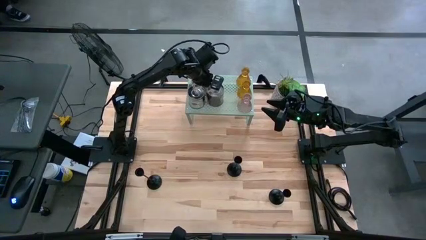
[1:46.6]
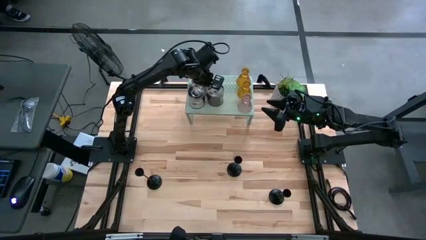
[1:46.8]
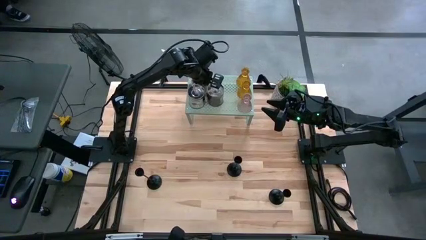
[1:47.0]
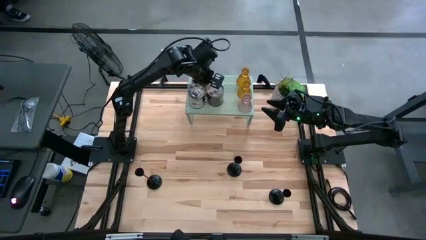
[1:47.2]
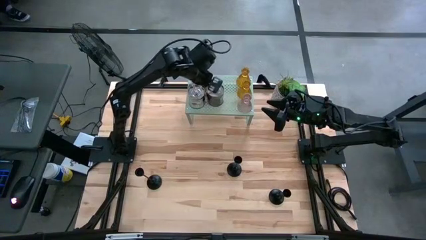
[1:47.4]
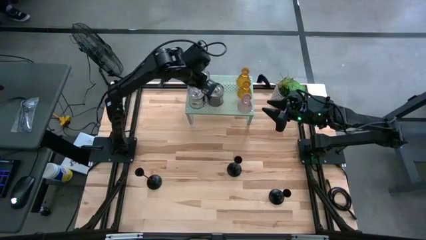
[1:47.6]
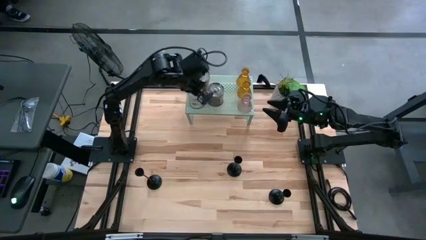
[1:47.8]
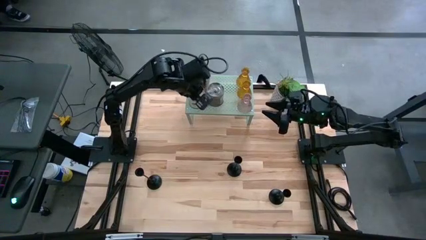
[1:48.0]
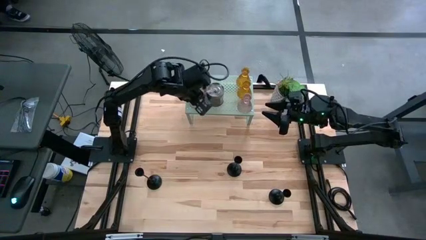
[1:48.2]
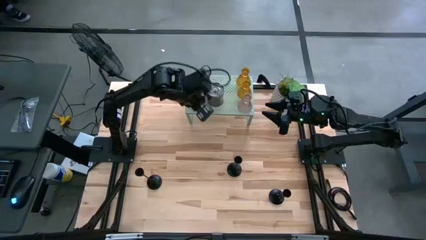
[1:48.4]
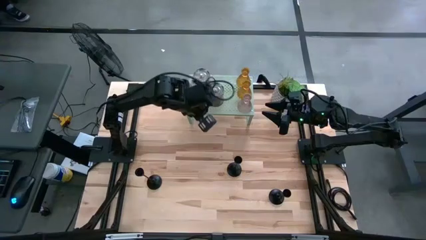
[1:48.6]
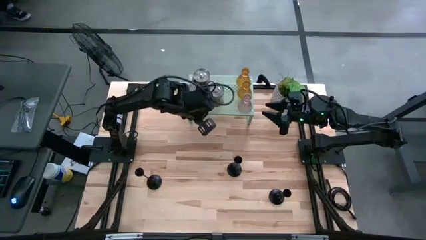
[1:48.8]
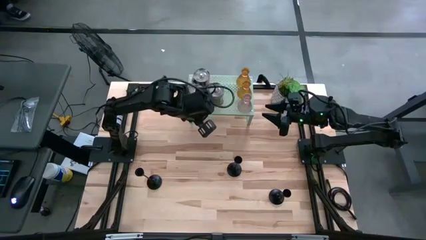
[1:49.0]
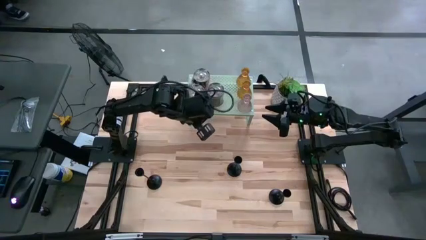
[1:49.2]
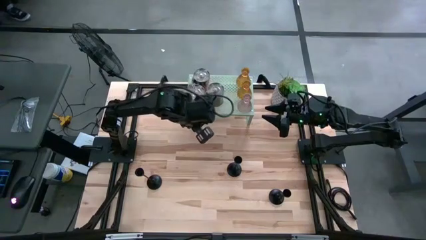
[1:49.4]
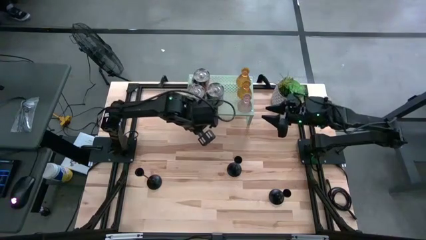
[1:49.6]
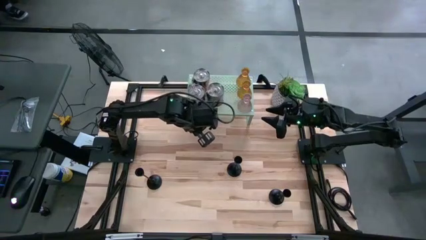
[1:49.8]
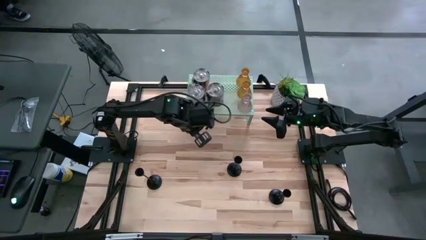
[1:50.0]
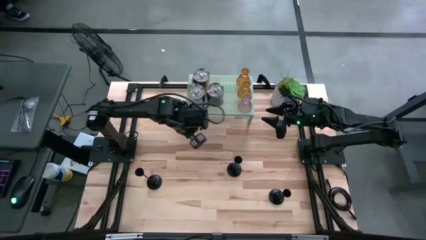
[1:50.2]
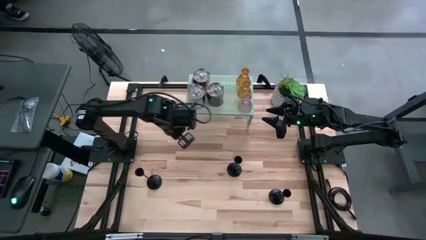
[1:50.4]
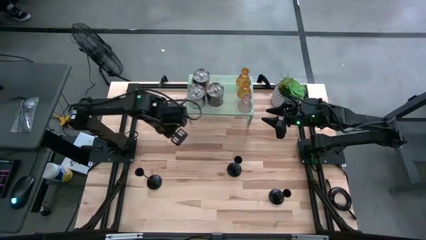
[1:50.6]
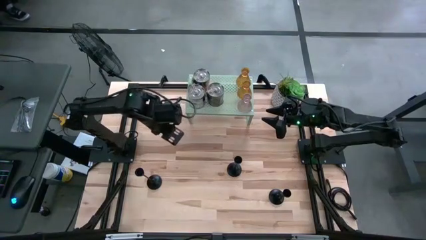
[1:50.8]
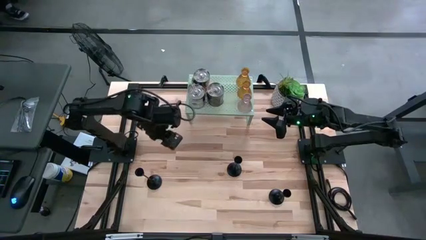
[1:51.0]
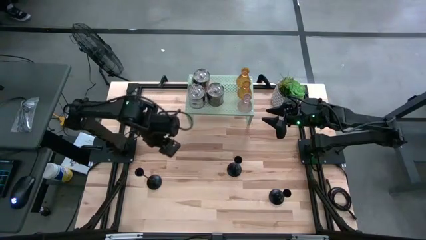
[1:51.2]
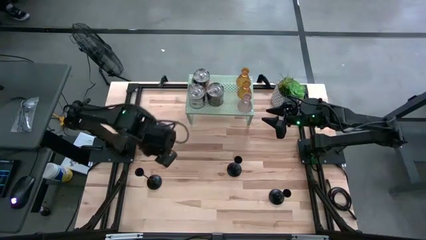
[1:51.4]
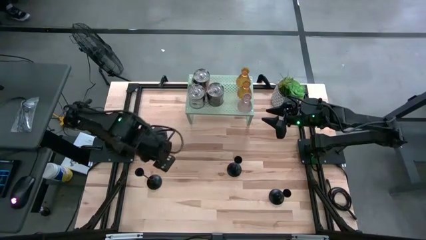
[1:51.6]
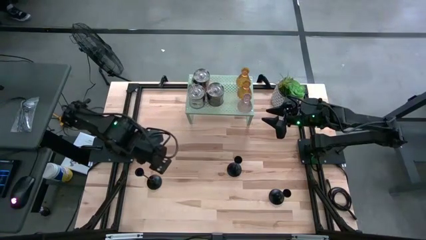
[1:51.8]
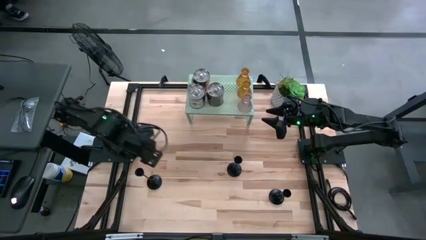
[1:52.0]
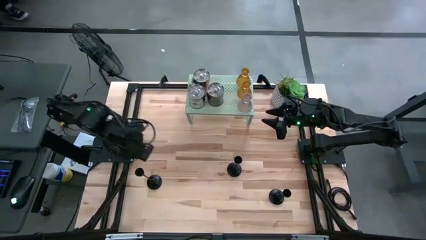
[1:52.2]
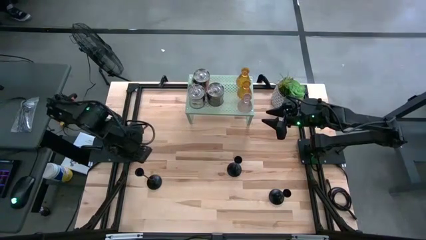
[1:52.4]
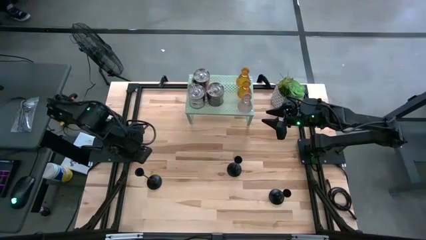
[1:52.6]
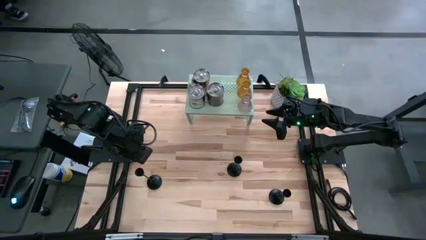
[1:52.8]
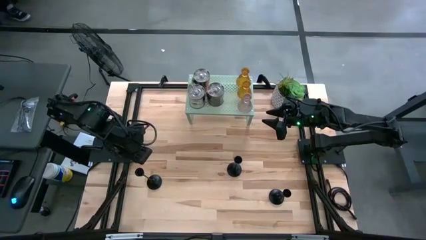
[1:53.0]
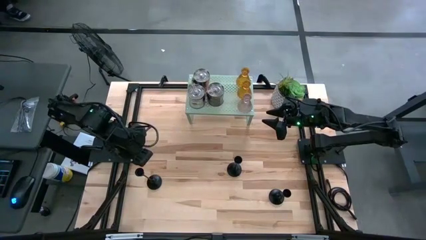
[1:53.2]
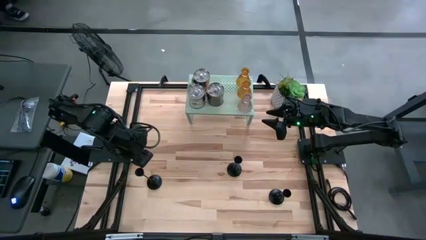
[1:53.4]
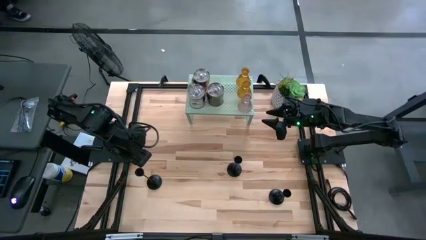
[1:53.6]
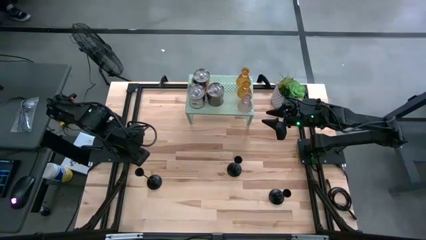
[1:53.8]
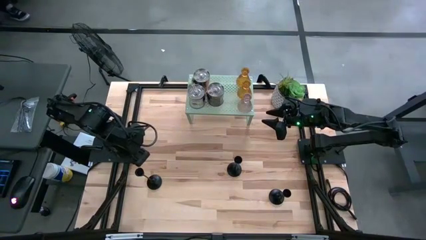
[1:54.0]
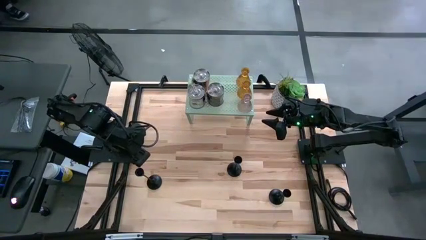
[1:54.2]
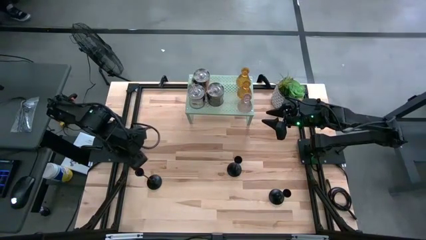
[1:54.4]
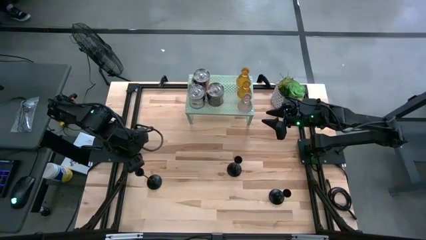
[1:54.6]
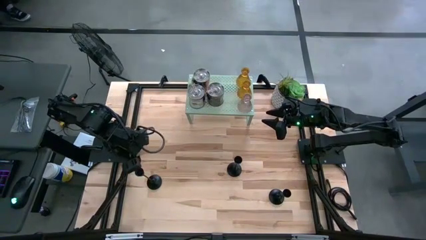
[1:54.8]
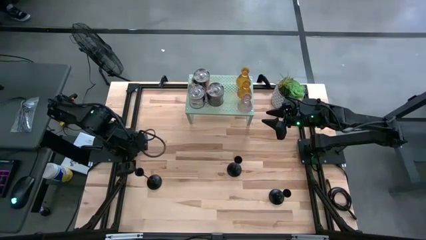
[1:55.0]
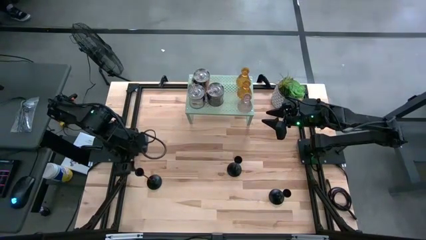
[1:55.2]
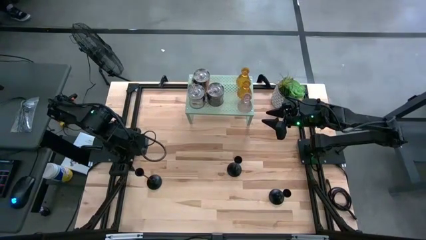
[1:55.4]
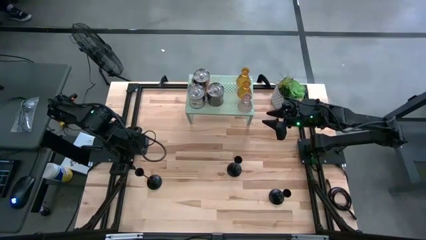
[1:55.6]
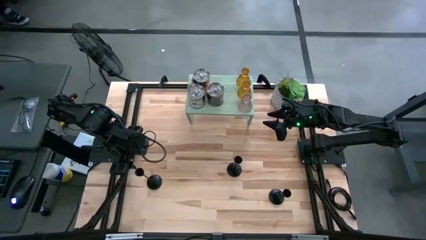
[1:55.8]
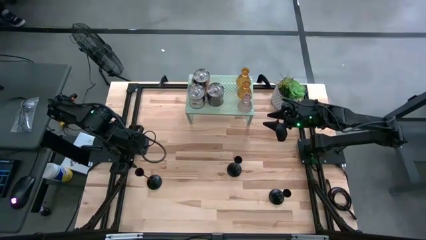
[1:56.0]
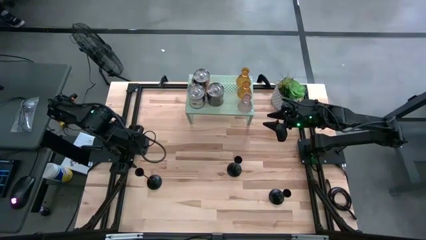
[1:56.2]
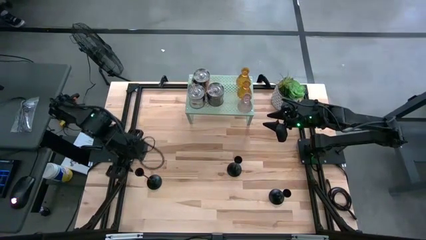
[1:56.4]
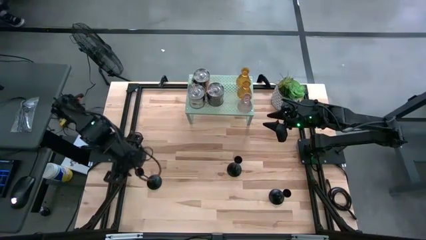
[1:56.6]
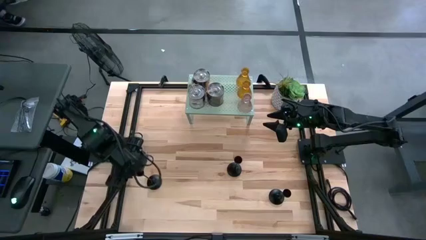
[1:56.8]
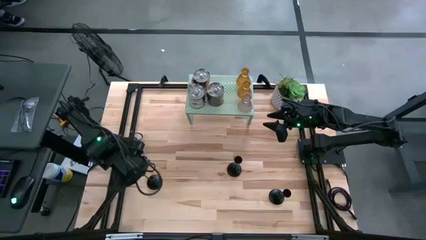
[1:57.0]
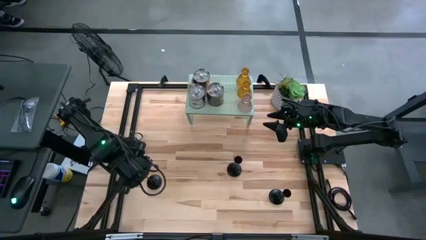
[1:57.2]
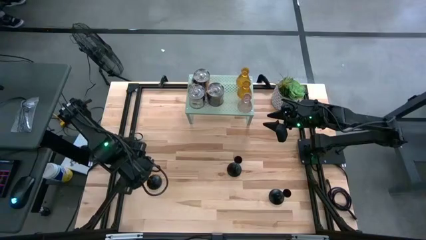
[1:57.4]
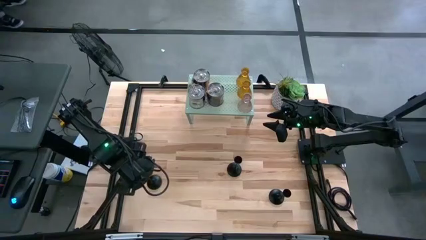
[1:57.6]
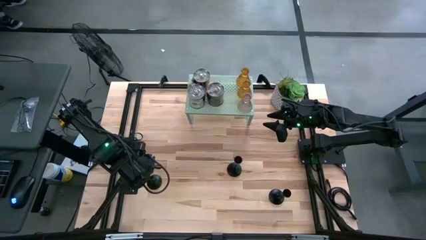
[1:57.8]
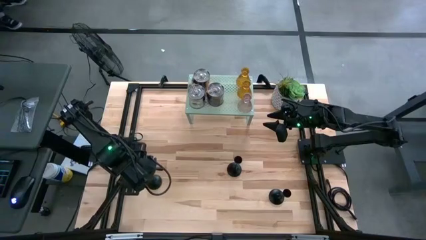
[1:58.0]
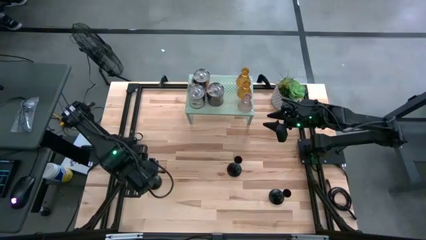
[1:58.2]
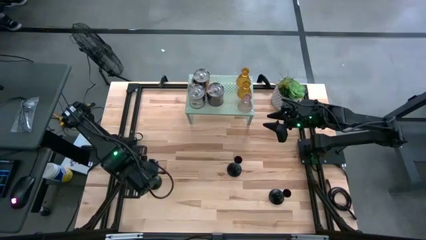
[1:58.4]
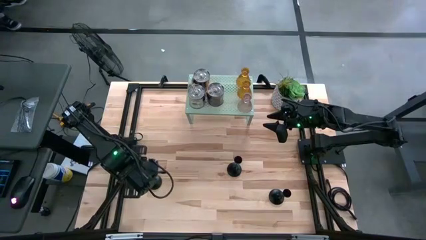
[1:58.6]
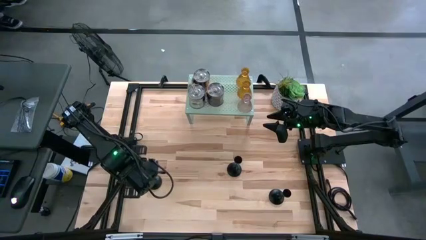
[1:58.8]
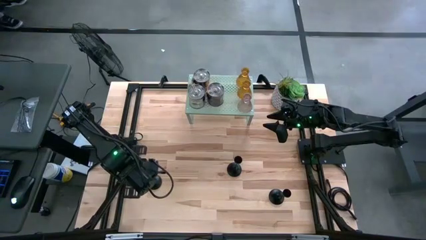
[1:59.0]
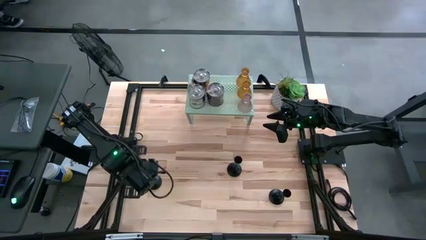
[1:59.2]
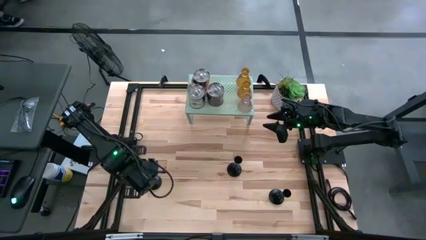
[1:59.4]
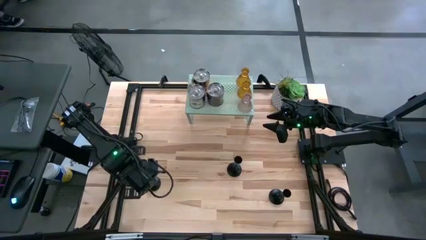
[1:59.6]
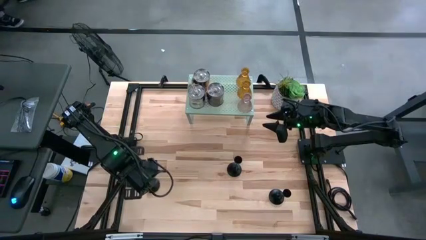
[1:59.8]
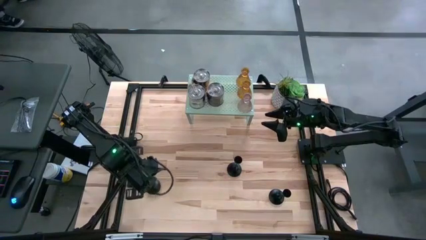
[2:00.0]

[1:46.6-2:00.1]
Task: Pick & Place candle stick holders
Put the left black candle holder on the shelf
